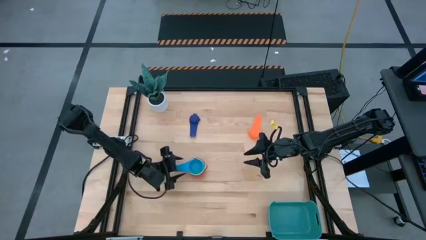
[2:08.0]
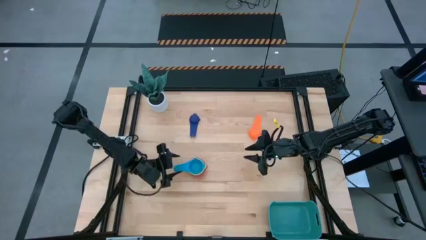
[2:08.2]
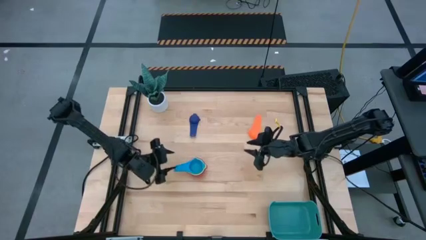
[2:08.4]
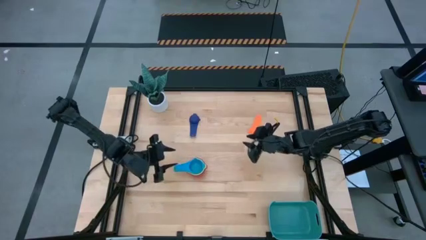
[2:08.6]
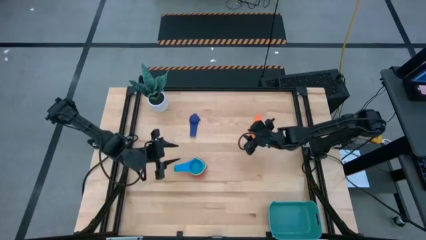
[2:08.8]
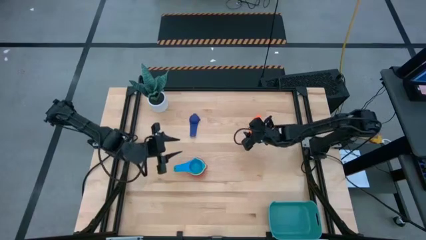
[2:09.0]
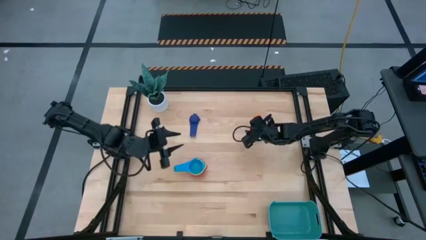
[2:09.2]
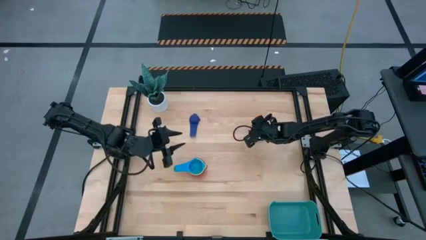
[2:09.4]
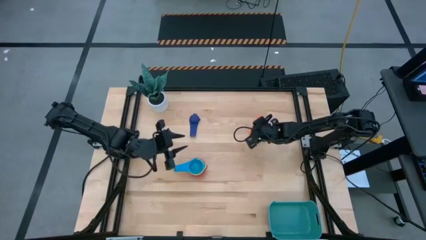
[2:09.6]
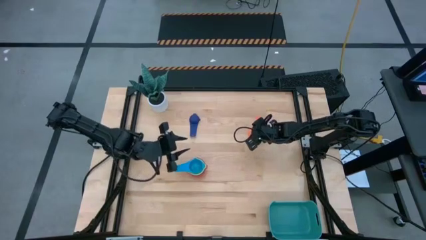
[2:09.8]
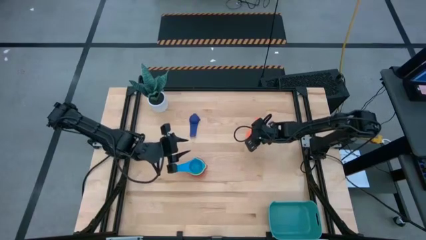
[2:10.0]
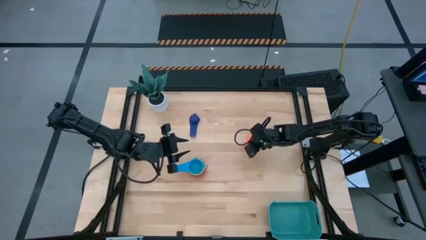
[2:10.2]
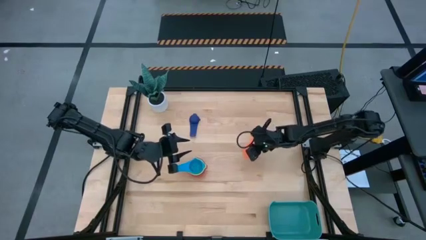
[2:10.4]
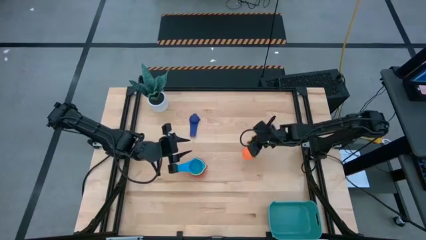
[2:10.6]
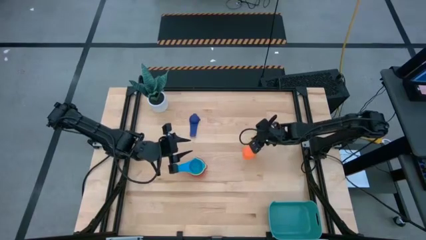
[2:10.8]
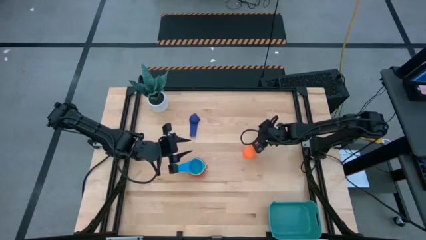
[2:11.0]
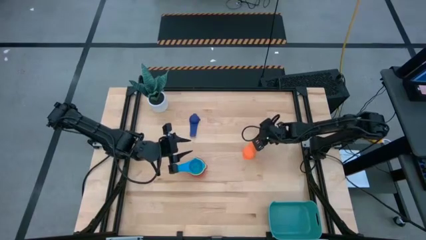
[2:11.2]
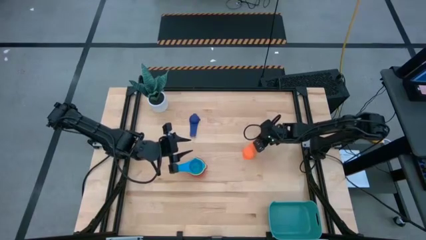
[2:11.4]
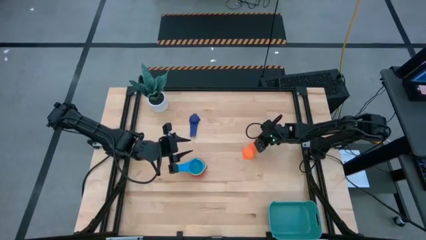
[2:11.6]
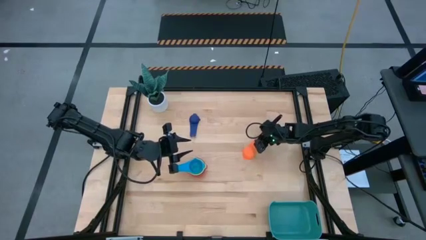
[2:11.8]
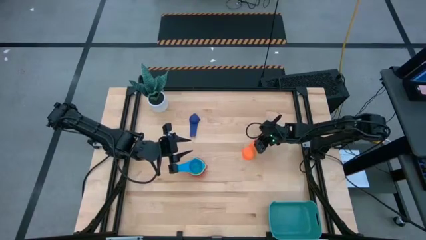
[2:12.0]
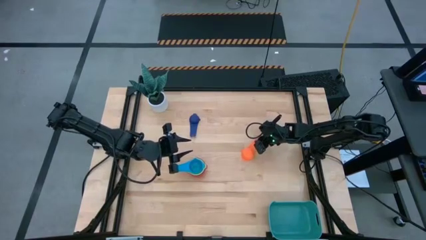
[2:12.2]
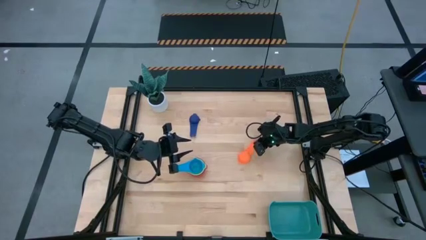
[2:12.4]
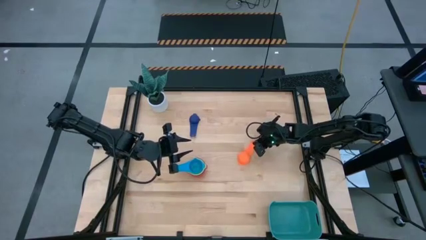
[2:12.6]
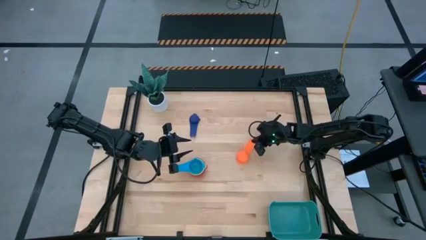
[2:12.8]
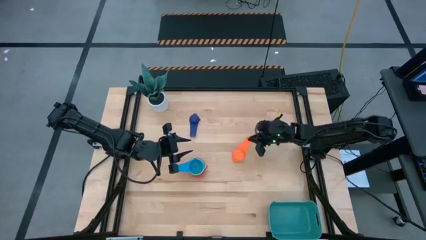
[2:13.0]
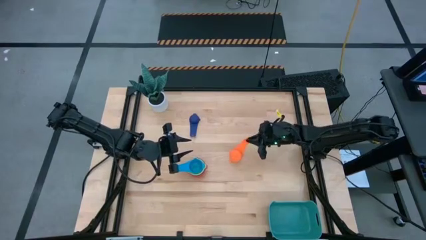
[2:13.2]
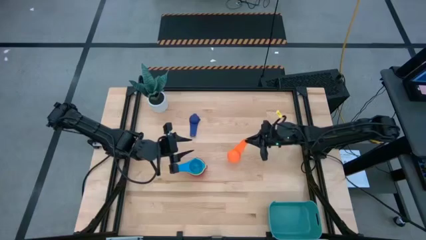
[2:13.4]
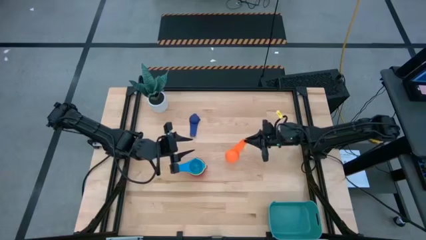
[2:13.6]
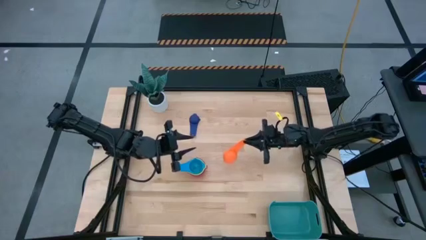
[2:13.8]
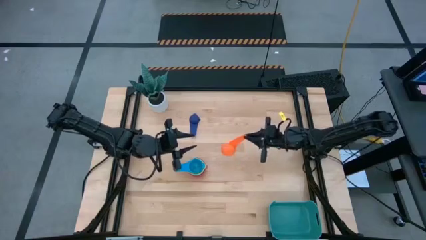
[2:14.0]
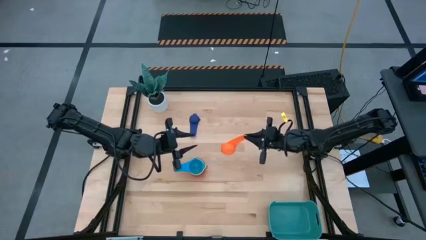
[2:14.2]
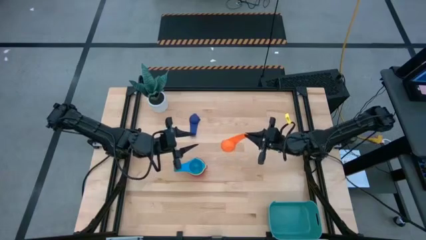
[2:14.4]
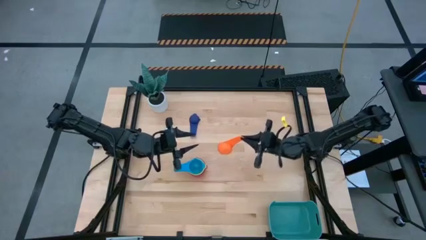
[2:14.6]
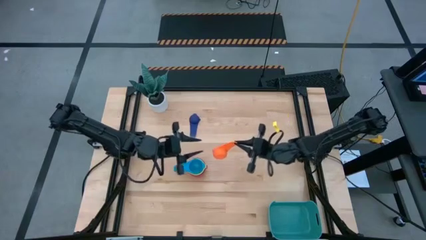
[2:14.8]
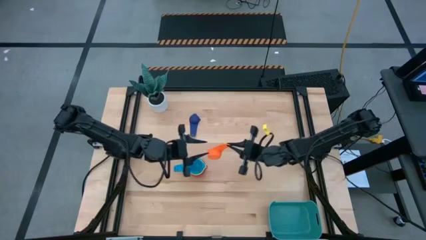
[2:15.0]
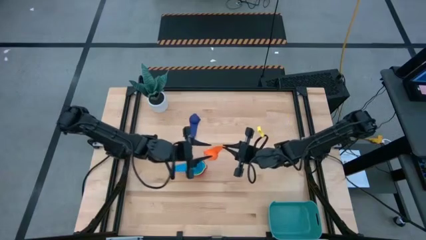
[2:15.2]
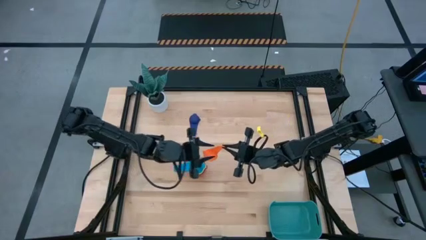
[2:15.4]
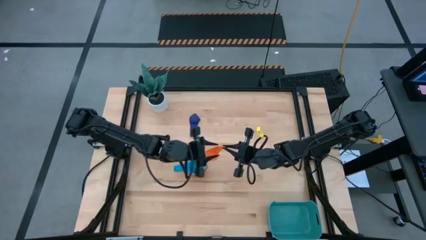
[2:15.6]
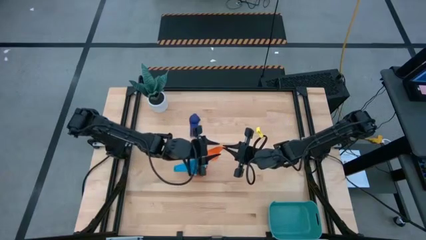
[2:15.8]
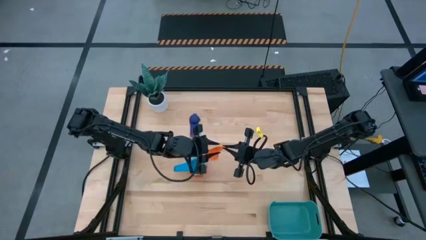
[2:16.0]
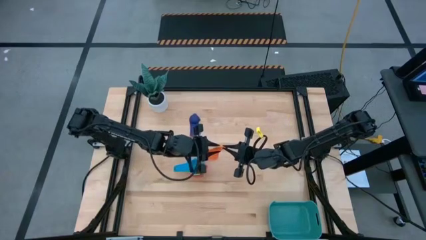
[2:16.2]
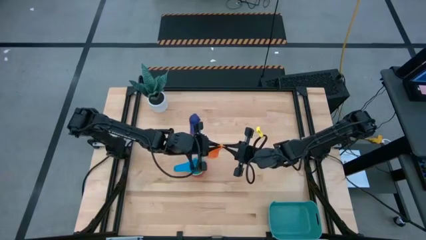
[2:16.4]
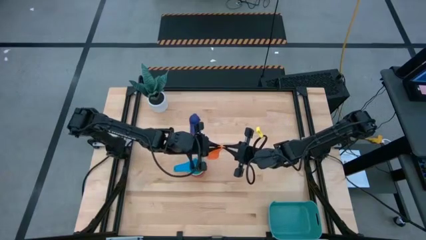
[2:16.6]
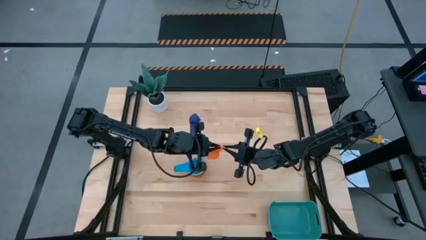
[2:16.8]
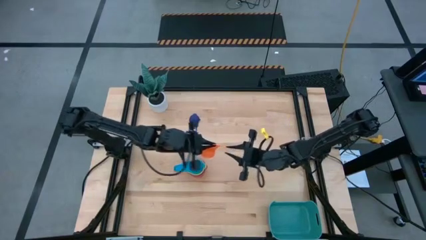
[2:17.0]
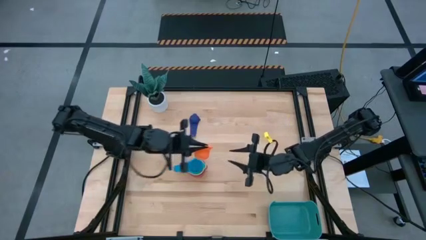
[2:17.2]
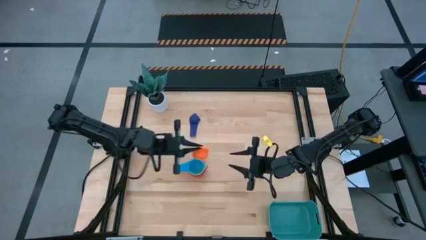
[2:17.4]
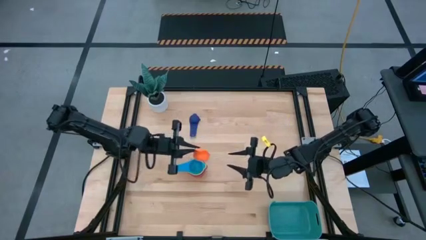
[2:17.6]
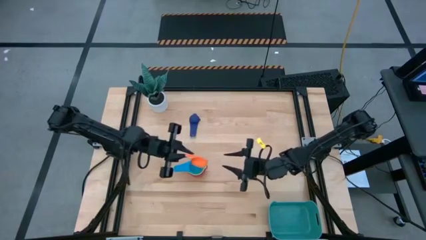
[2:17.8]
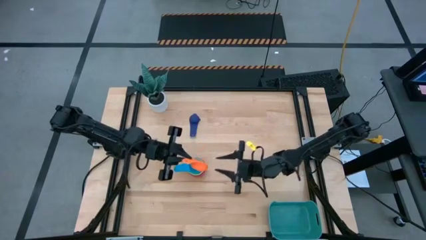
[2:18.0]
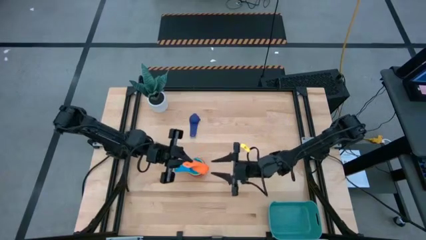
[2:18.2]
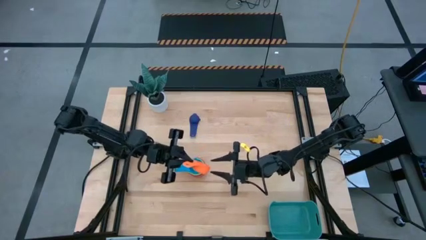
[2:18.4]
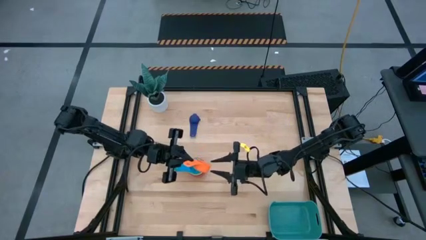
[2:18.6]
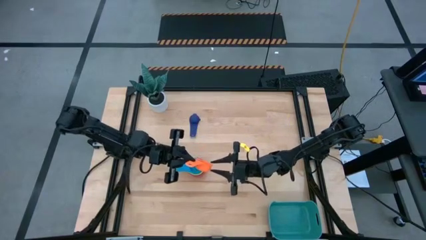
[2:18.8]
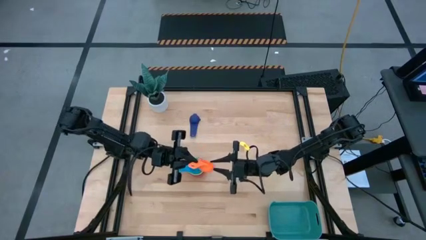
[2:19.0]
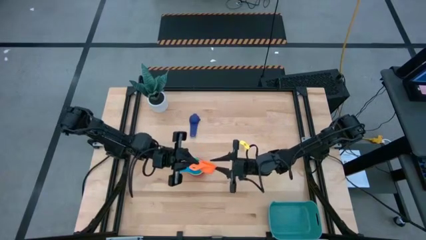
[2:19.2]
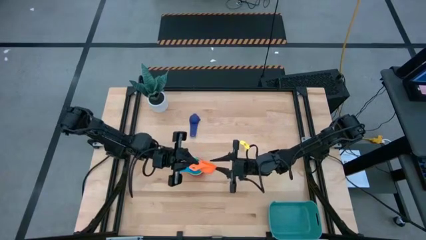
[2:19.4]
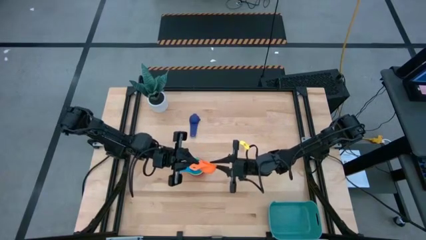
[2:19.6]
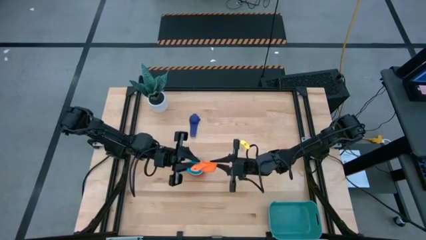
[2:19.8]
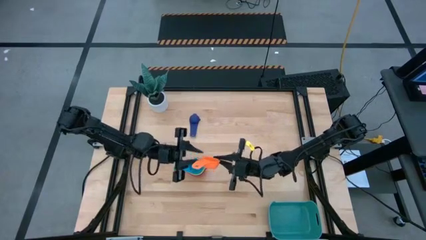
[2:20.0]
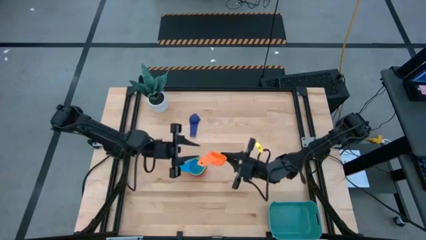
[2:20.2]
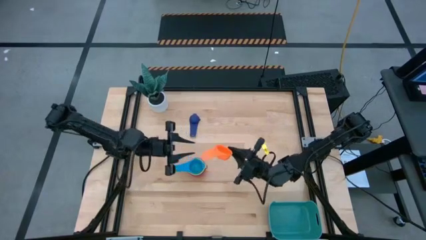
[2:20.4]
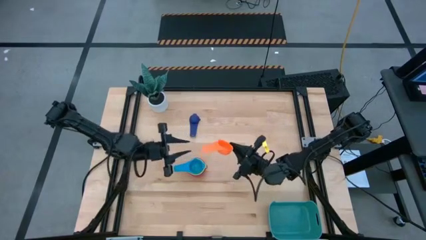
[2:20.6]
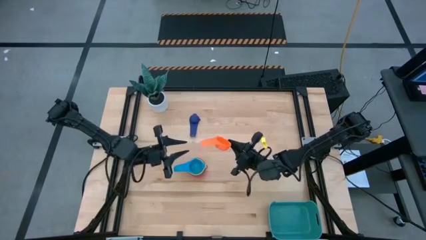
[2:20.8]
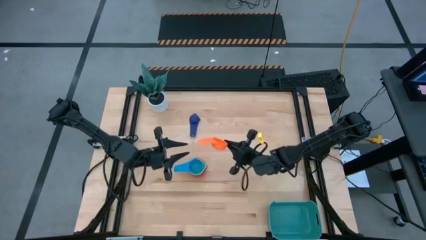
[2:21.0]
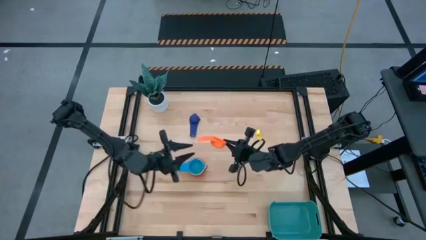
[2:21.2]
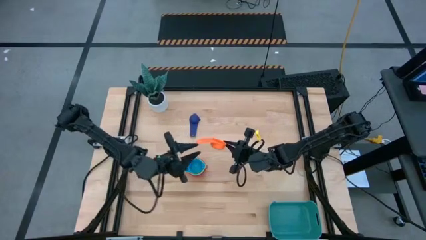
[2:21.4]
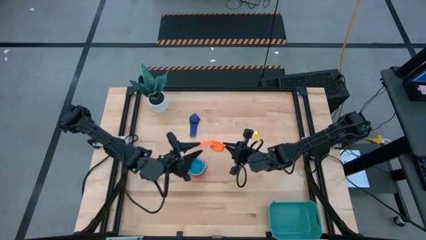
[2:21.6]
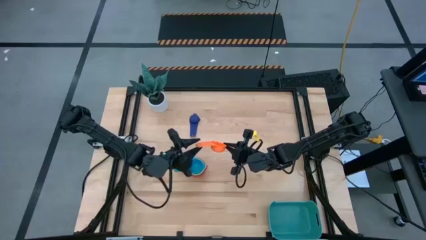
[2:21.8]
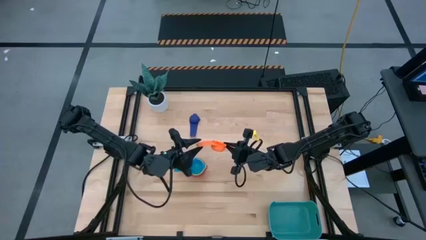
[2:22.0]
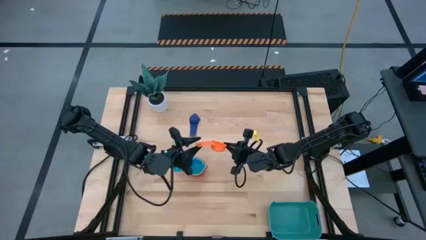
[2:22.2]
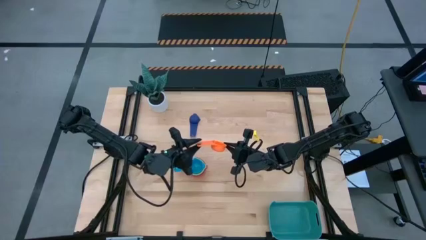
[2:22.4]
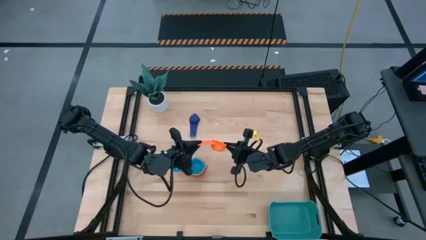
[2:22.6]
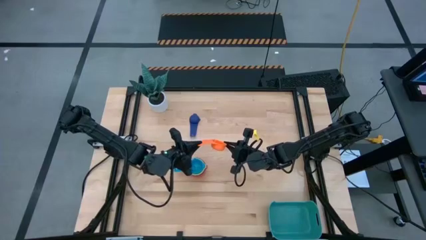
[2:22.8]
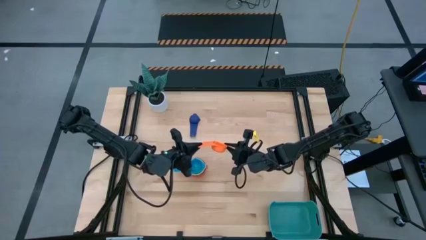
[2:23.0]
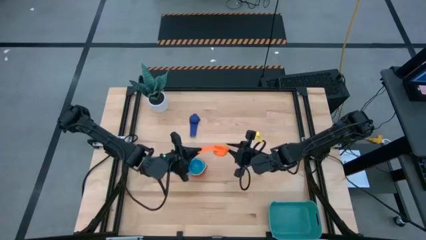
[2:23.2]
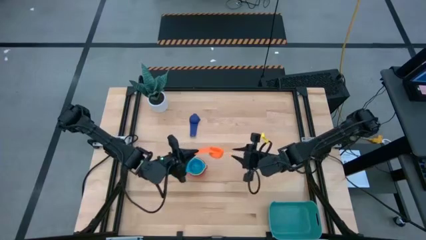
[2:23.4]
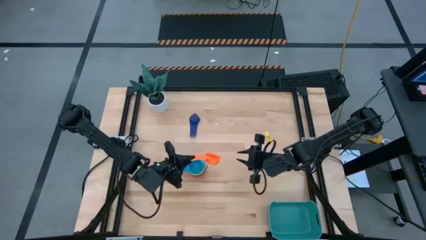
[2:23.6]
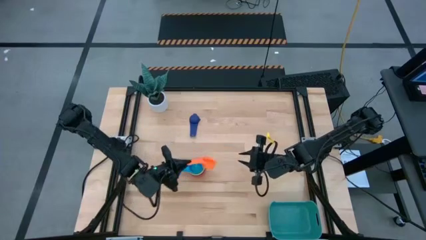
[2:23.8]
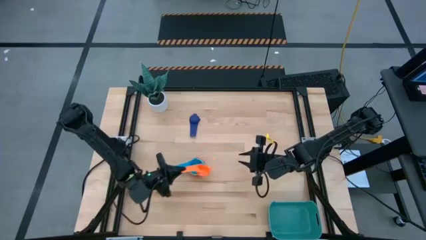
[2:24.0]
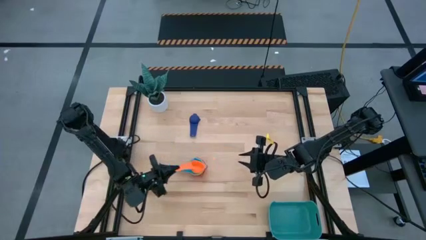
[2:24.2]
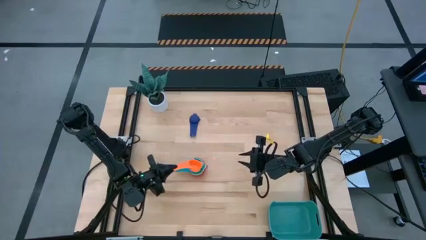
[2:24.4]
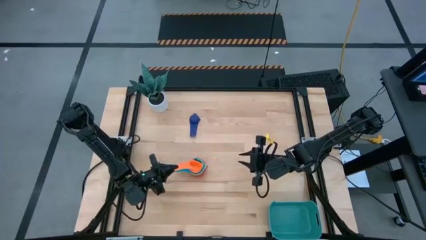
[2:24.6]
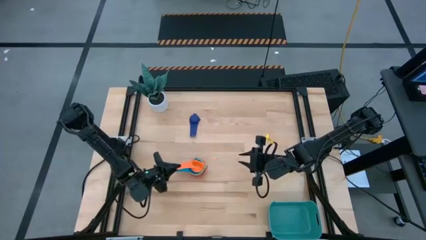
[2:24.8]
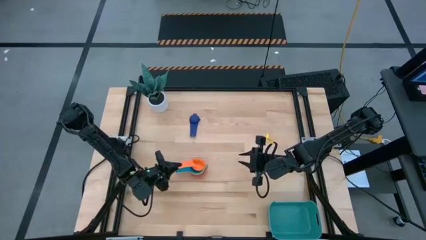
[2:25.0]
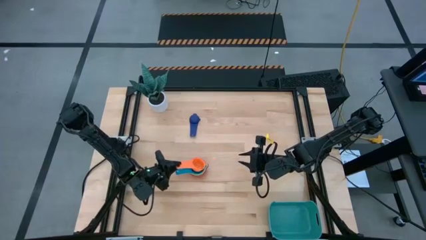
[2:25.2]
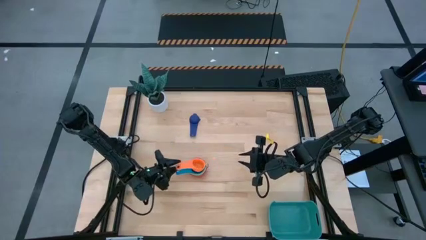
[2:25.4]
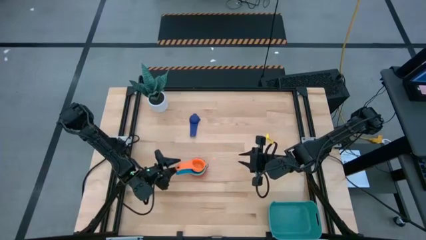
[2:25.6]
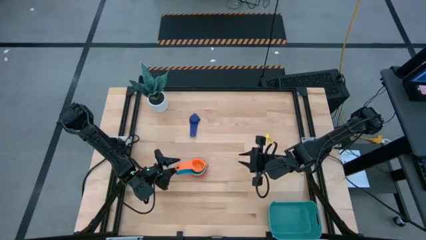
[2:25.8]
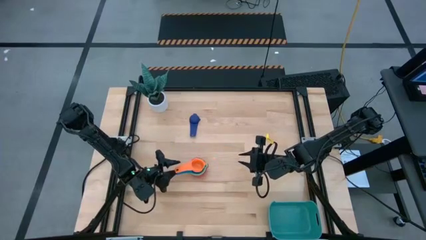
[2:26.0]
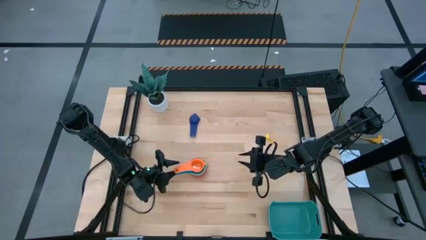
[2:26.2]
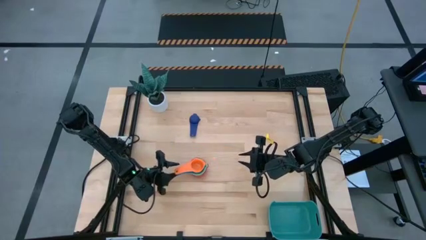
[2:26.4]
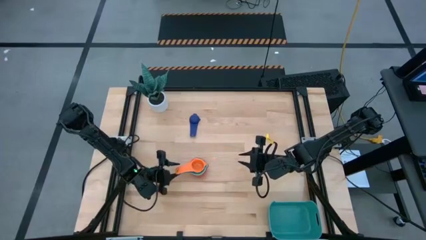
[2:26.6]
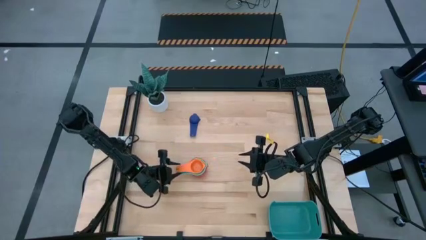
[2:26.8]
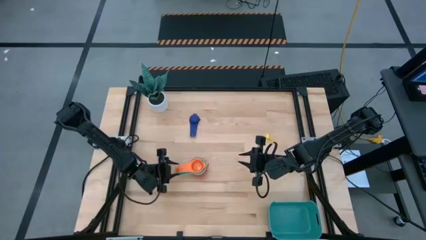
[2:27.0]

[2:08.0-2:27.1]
Task: Nest measuring cups in basket
Stack the orange measuring cup on top of the light blue measuring cup
